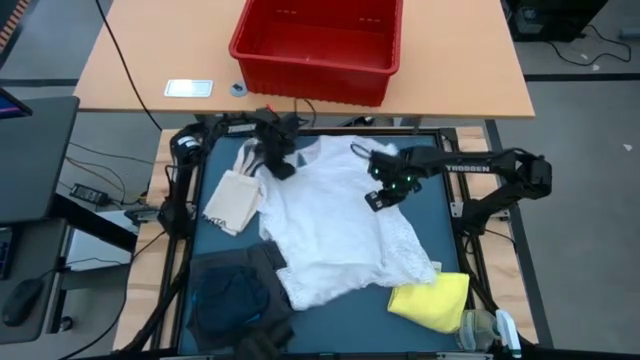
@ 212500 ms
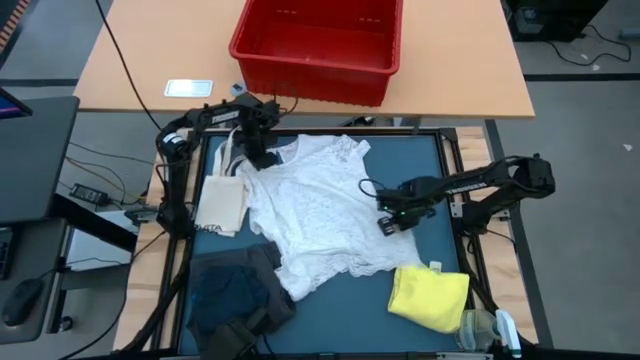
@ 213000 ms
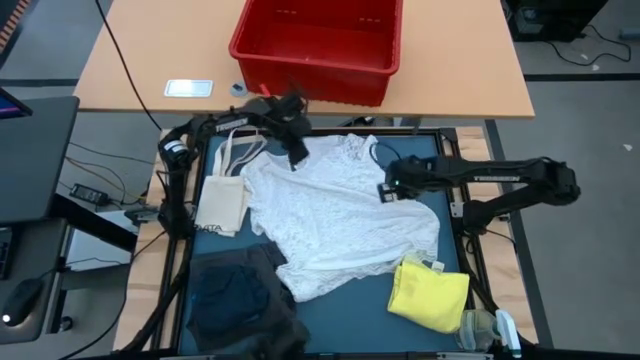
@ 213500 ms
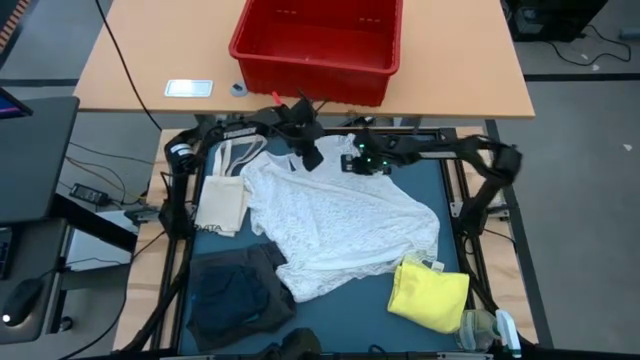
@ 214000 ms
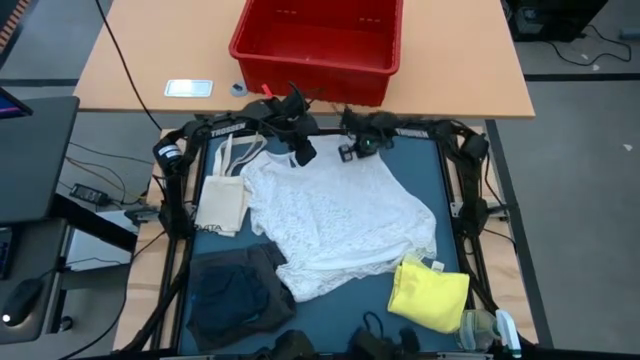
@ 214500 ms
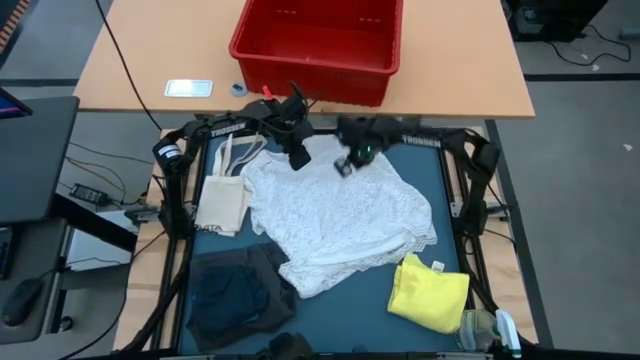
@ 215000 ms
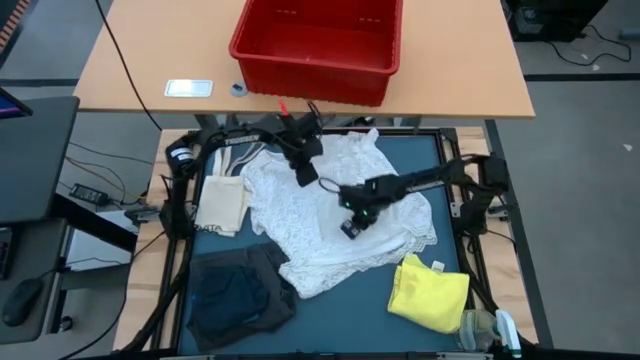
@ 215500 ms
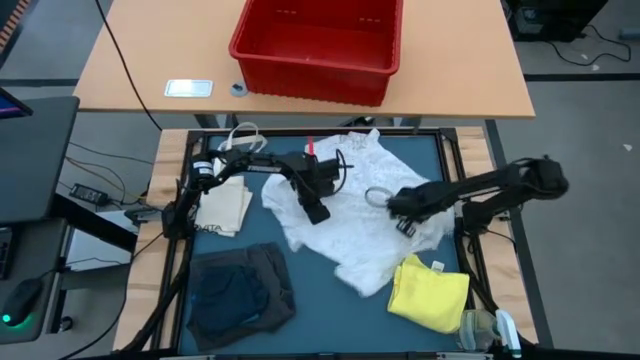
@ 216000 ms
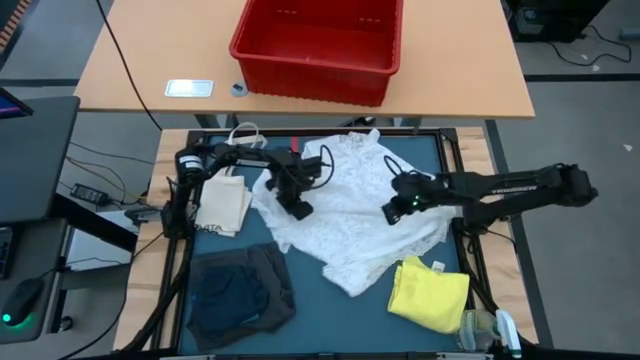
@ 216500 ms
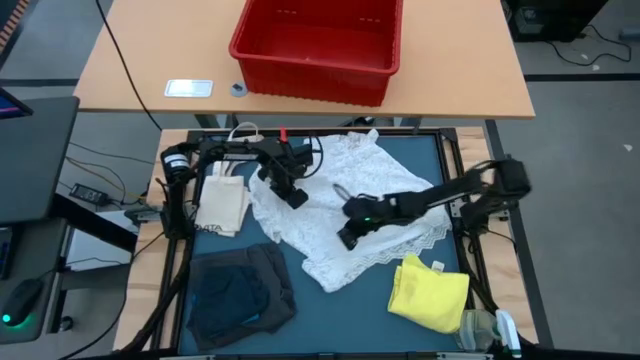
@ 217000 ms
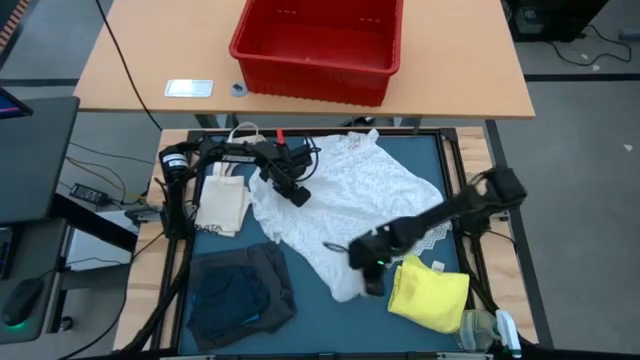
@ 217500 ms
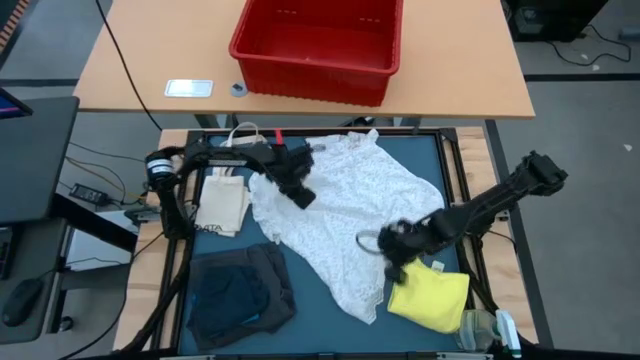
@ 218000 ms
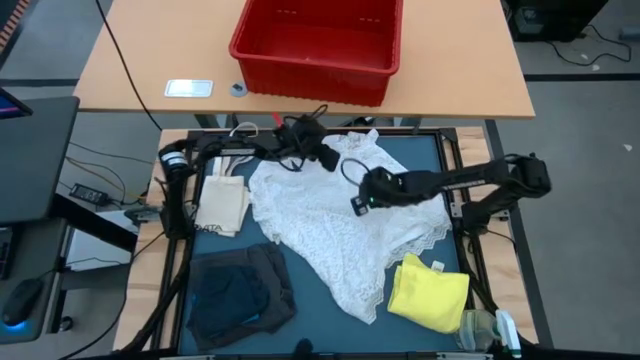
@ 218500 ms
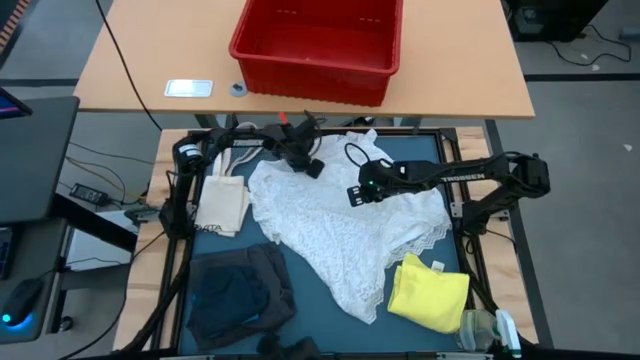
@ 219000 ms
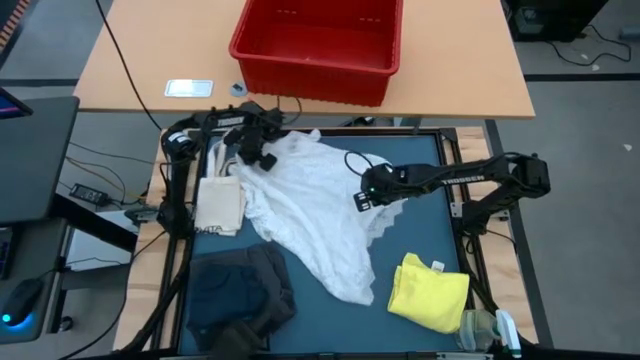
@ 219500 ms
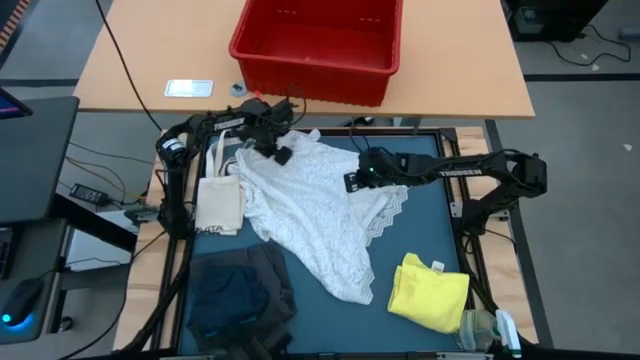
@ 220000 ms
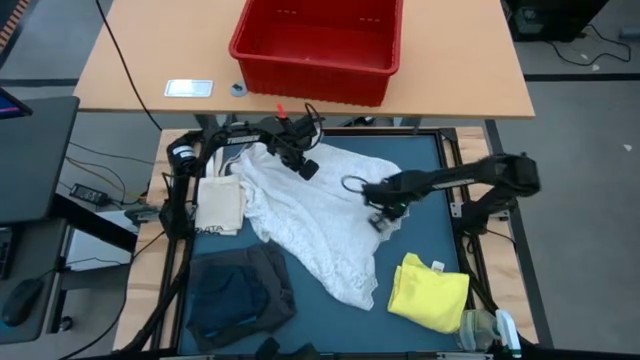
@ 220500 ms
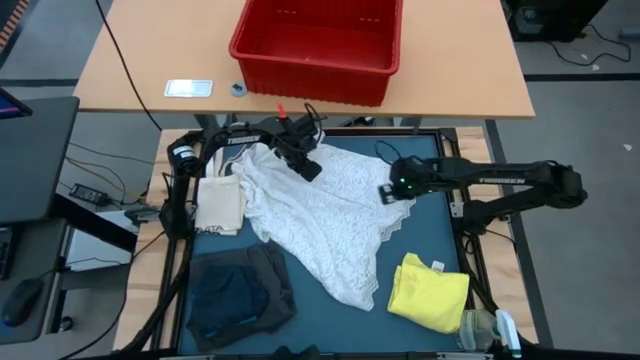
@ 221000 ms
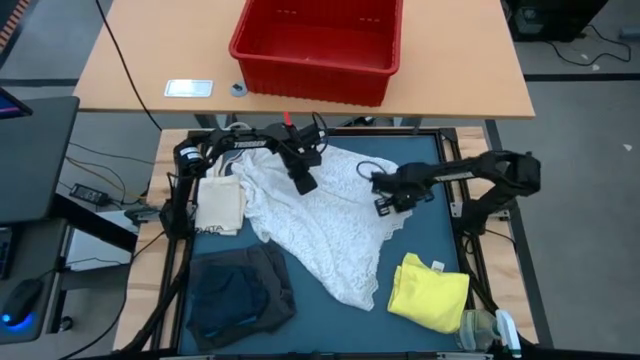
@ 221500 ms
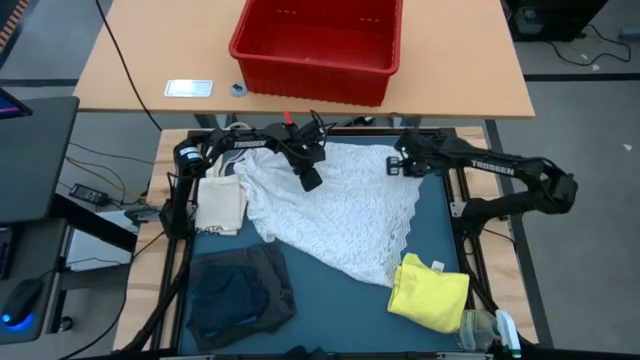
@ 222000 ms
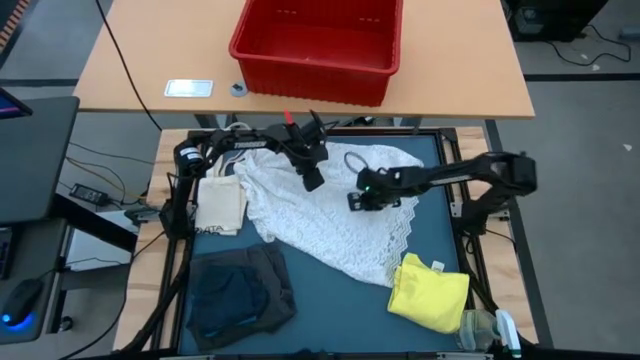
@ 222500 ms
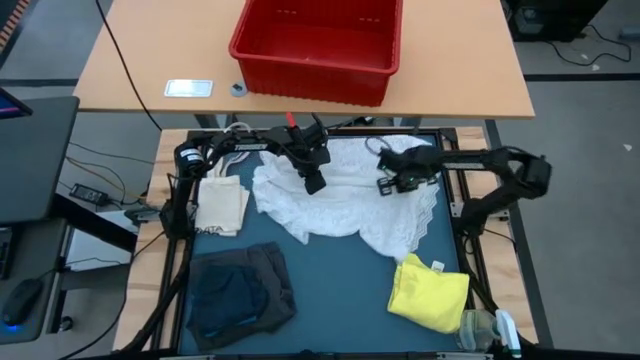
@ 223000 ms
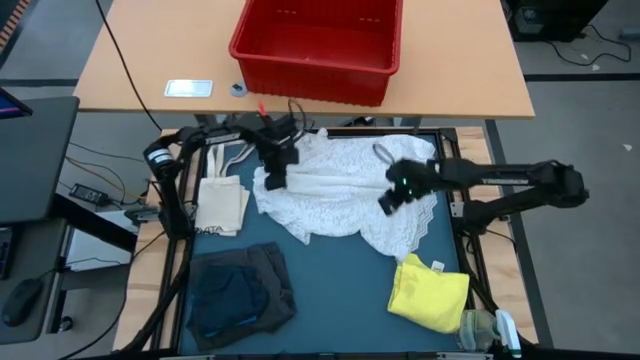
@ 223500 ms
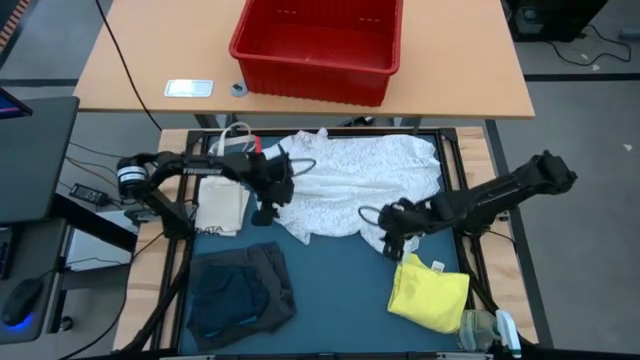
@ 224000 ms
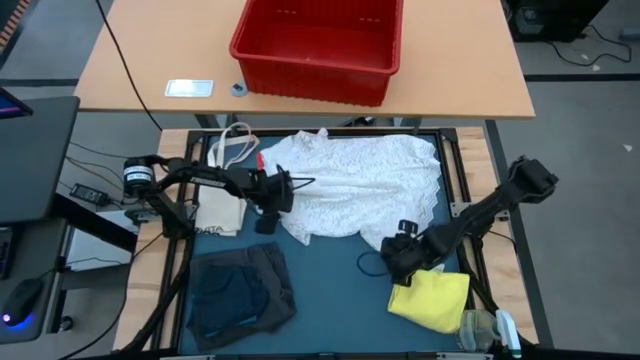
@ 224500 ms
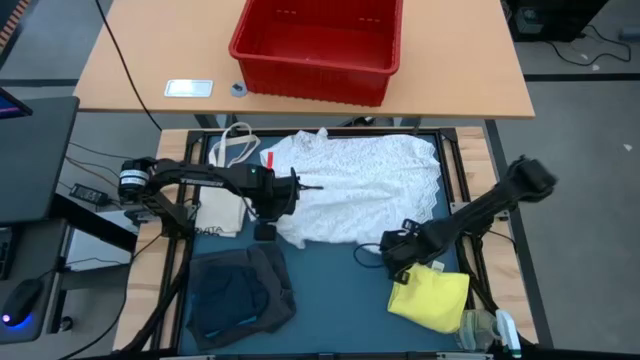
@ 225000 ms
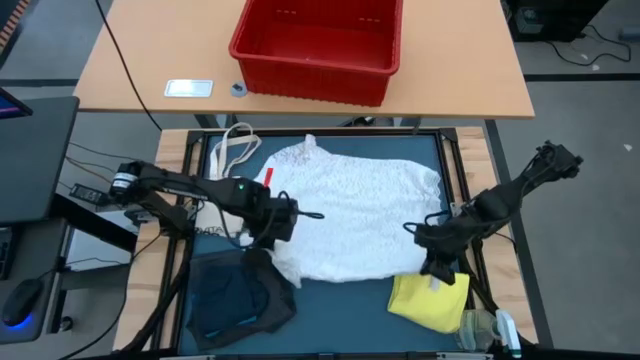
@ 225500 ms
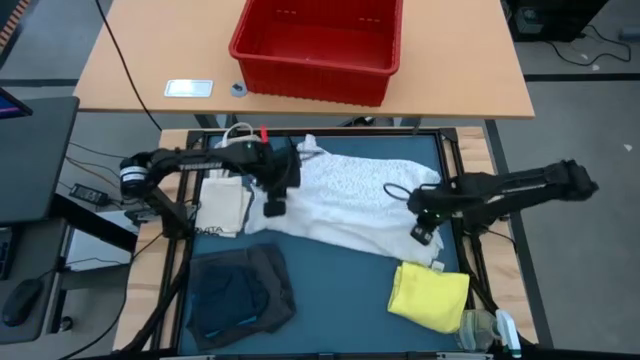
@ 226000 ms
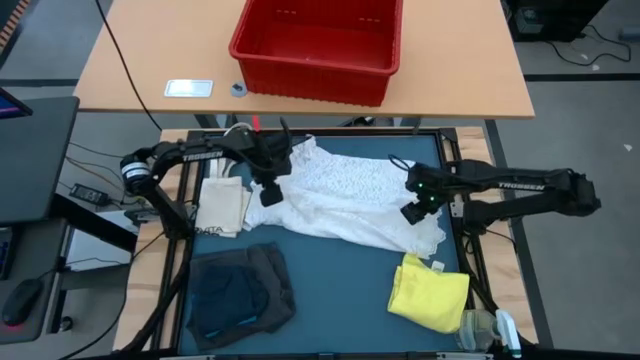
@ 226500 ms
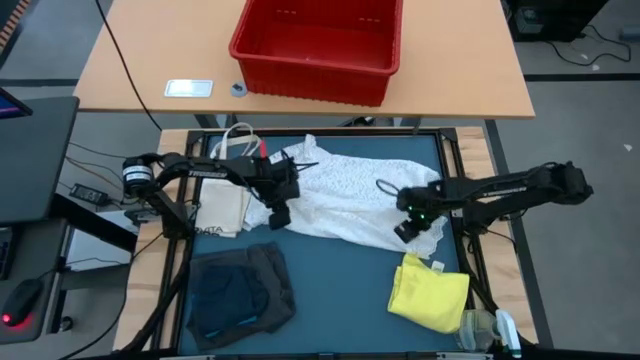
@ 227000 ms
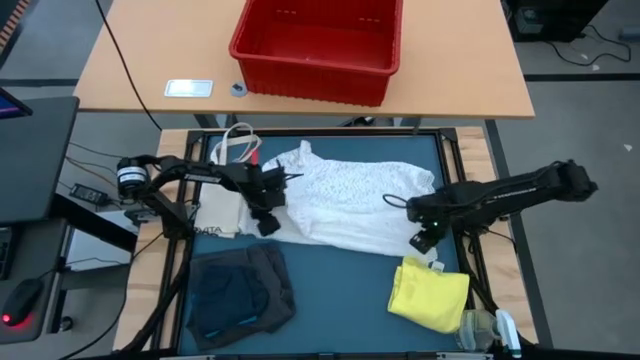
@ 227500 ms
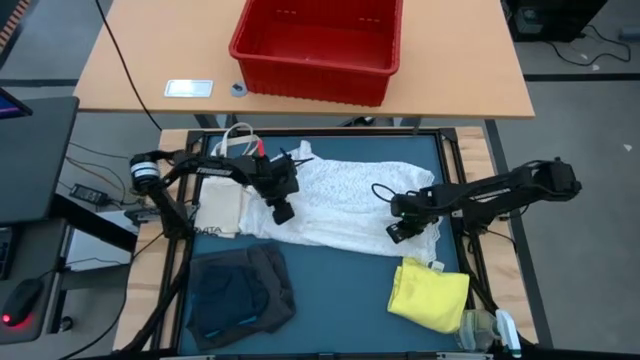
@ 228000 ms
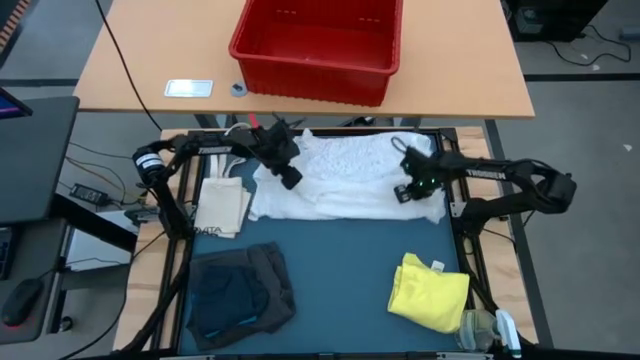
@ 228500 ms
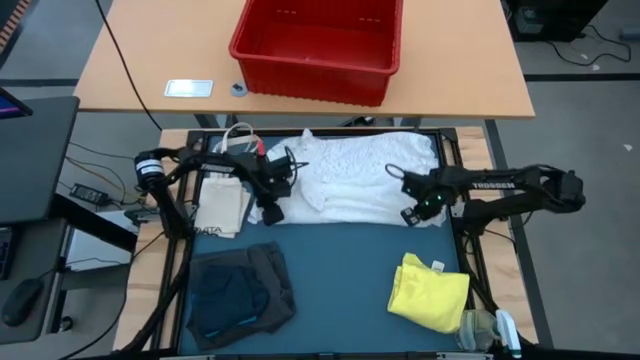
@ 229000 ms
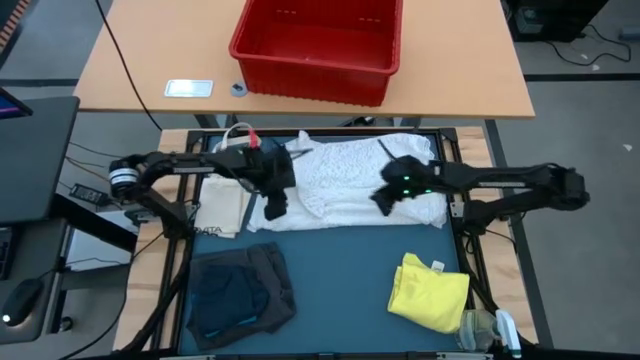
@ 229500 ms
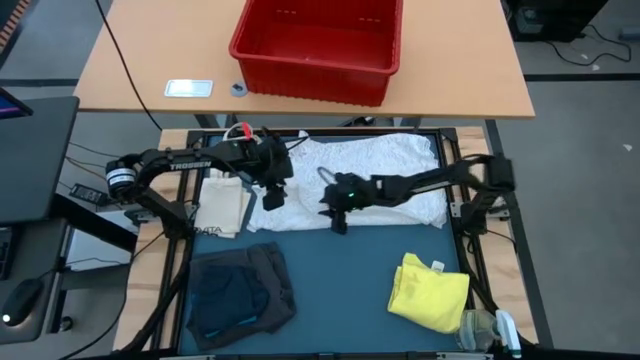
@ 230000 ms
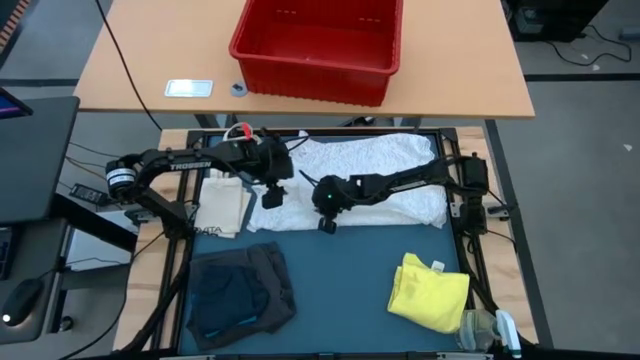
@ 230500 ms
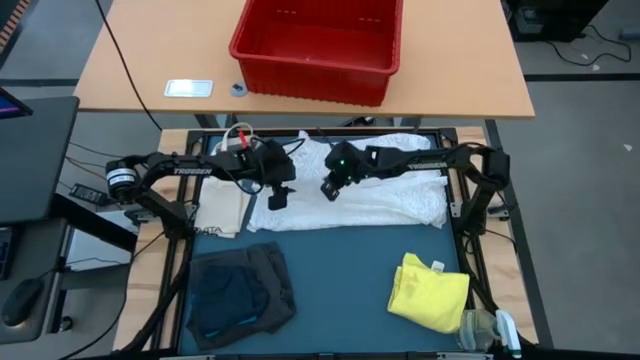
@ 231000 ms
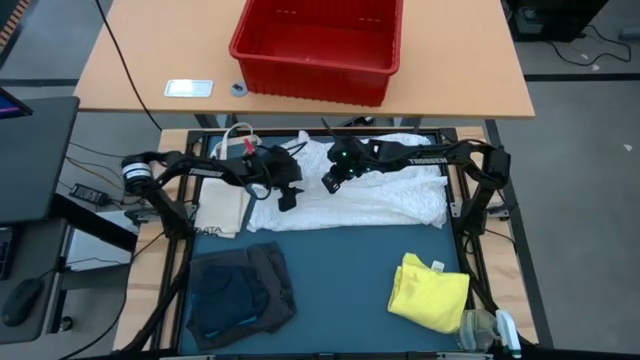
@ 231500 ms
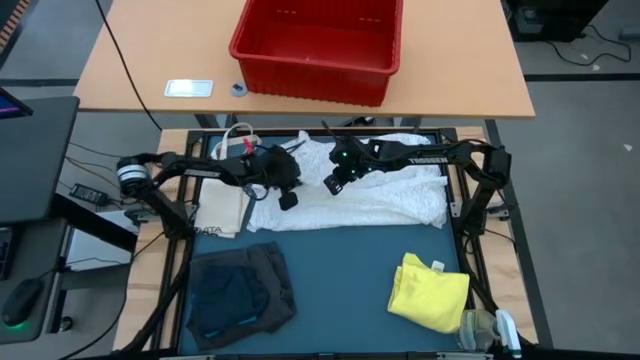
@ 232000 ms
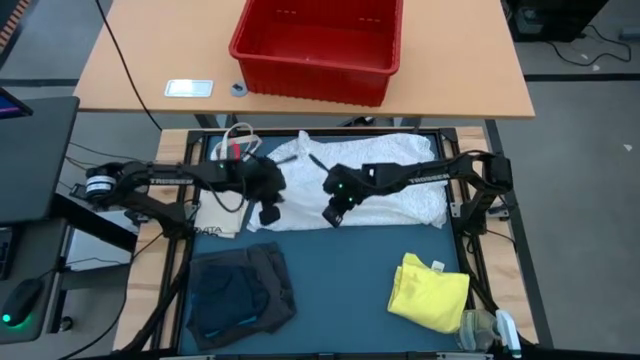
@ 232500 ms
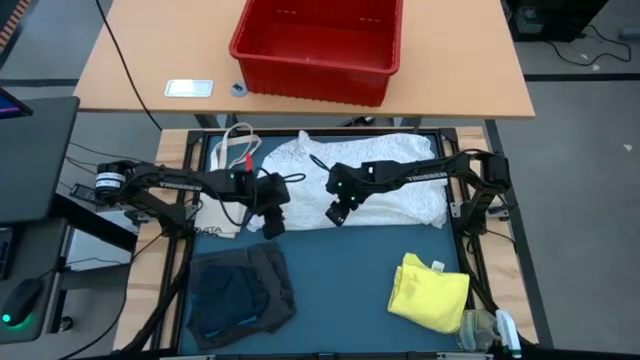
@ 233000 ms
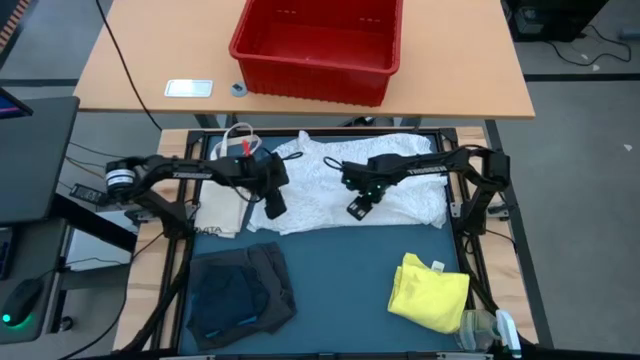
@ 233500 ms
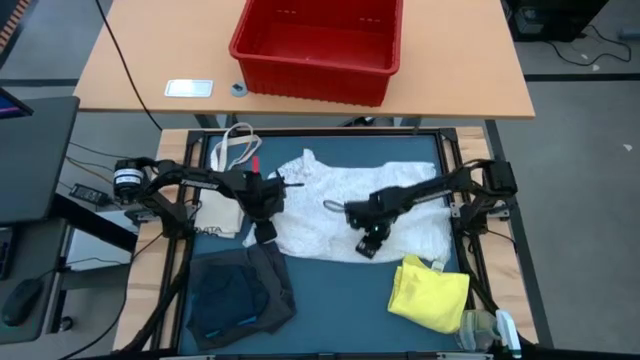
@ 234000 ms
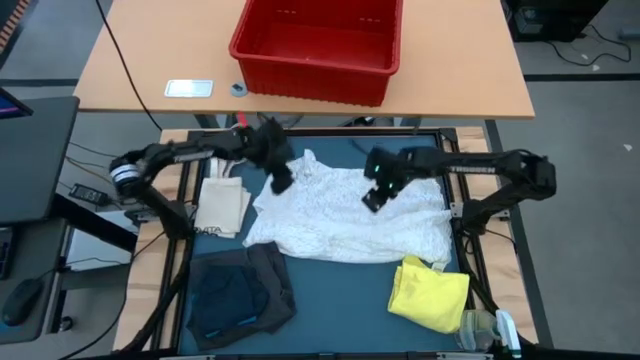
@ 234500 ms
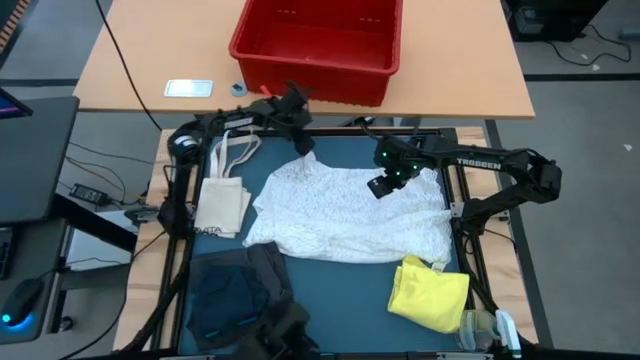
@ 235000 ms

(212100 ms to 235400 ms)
Task: Fold laundry
Fold the white shirt
